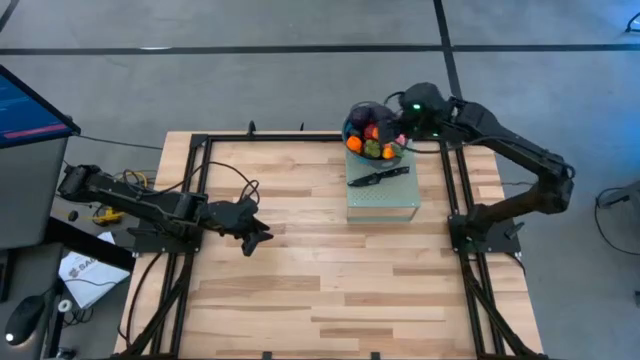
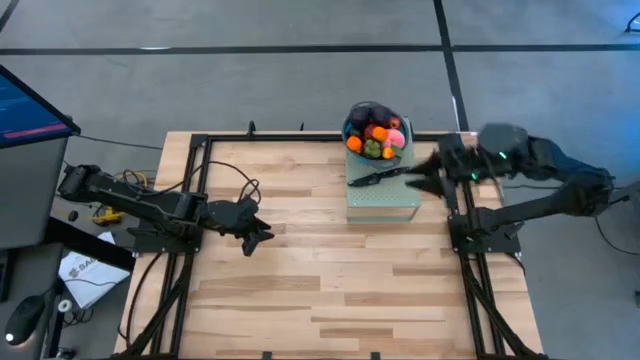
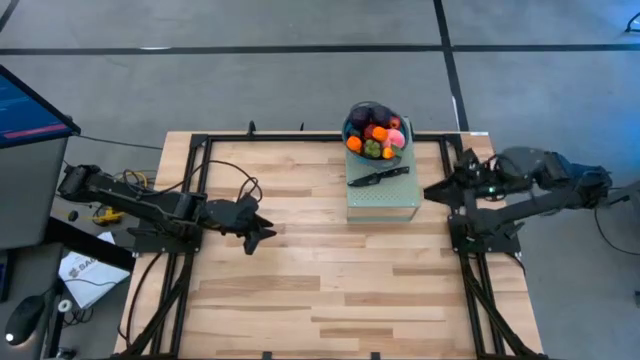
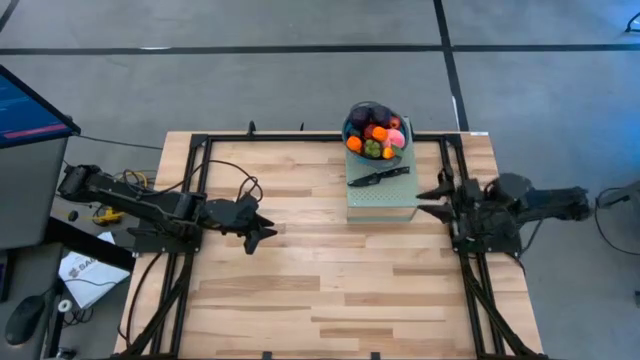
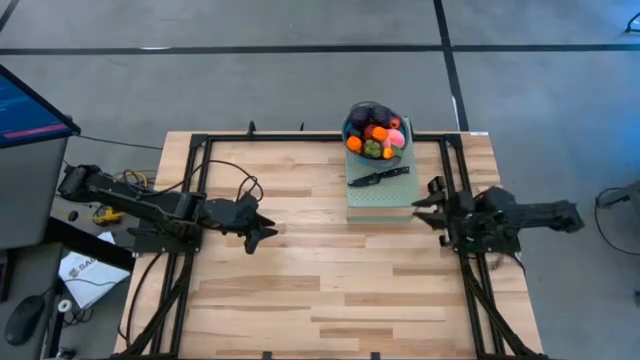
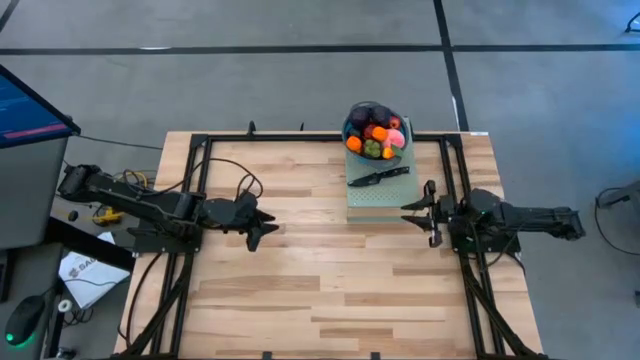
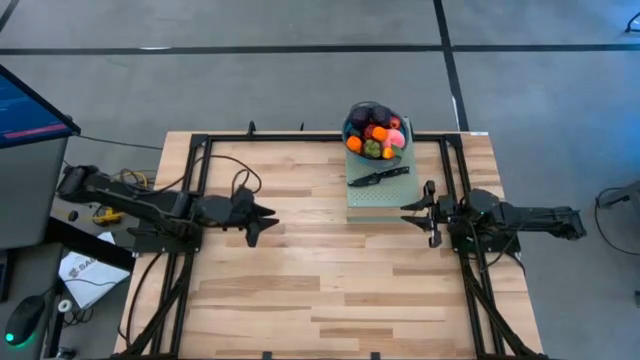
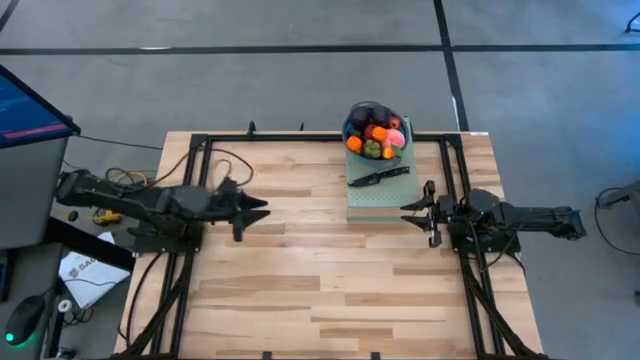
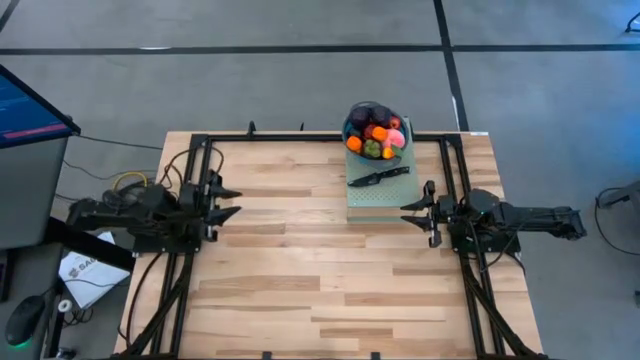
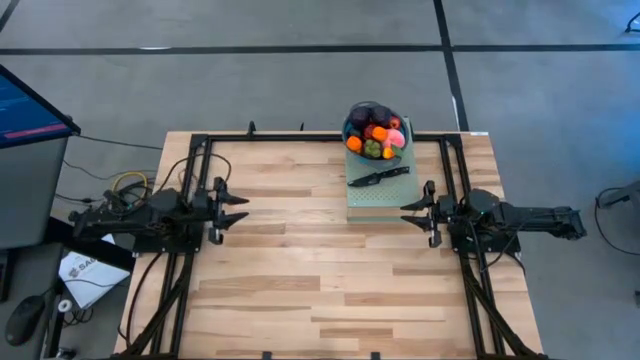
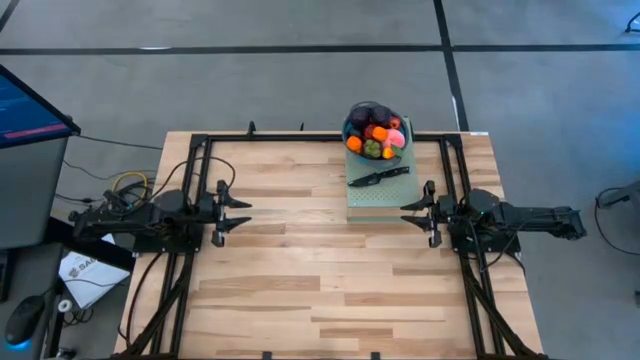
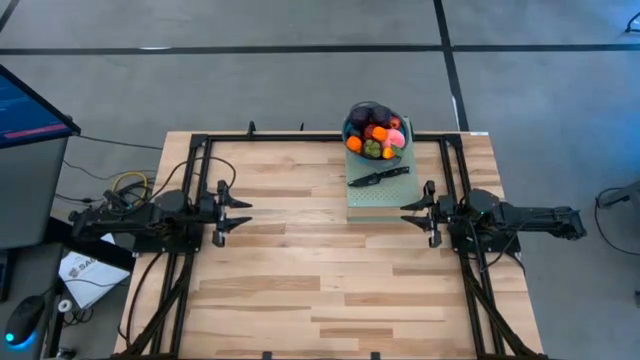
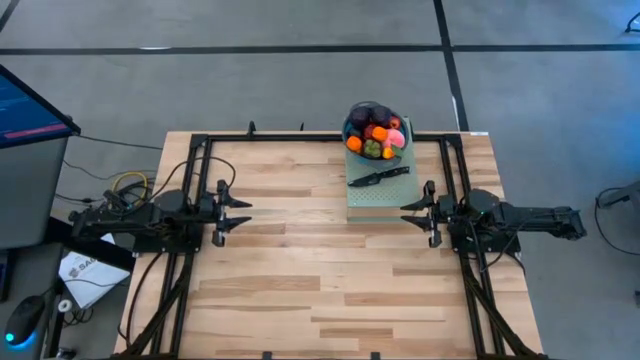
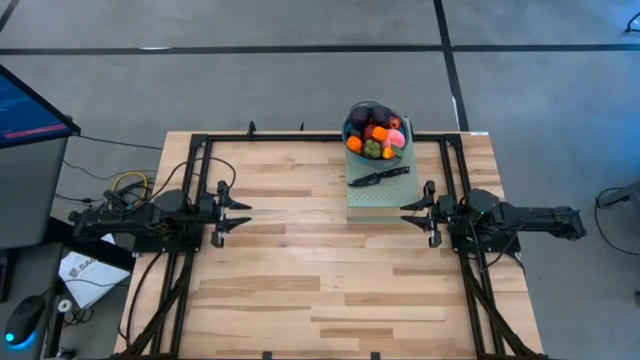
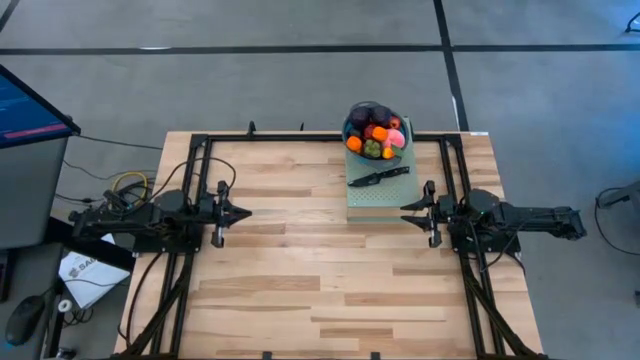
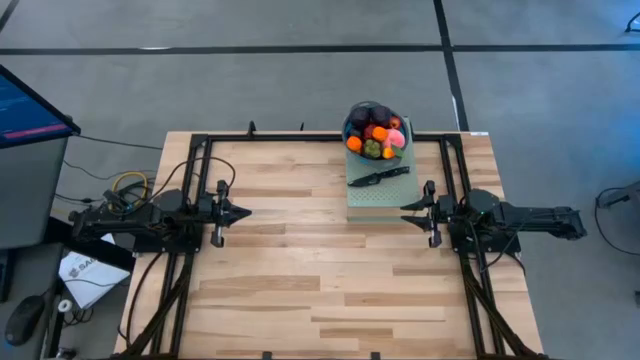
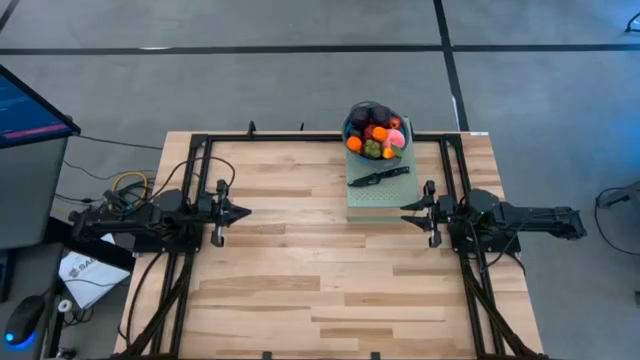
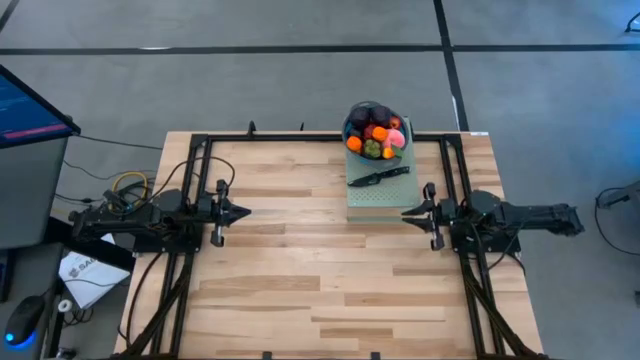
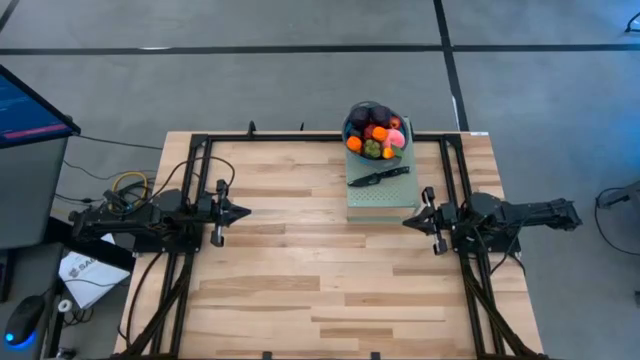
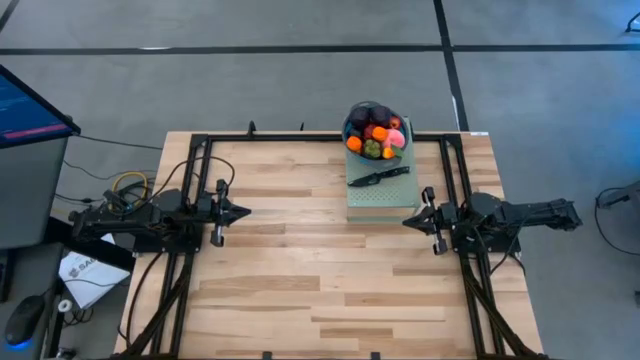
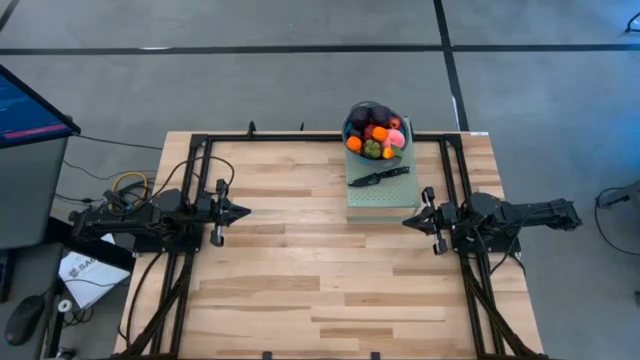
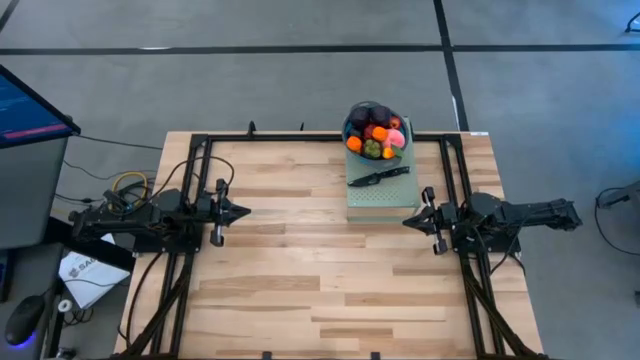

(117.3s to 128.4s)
Task: Pick & Place Fruit
Return to Home Position

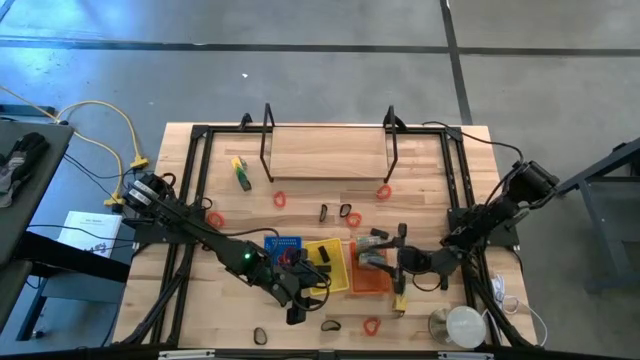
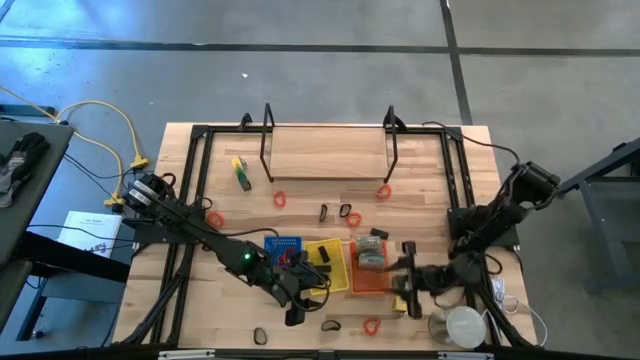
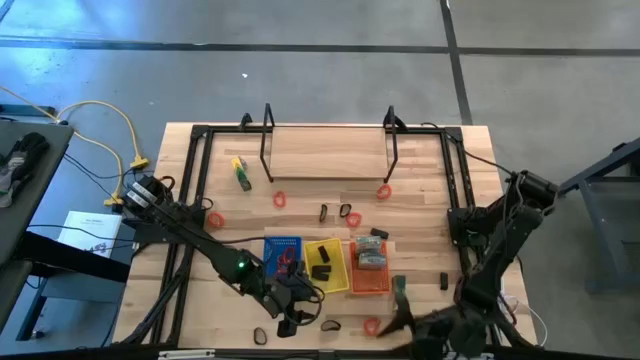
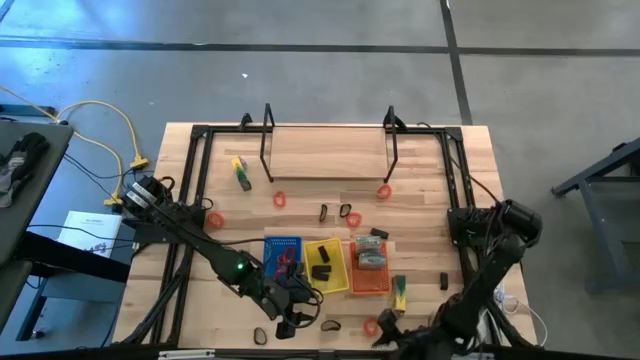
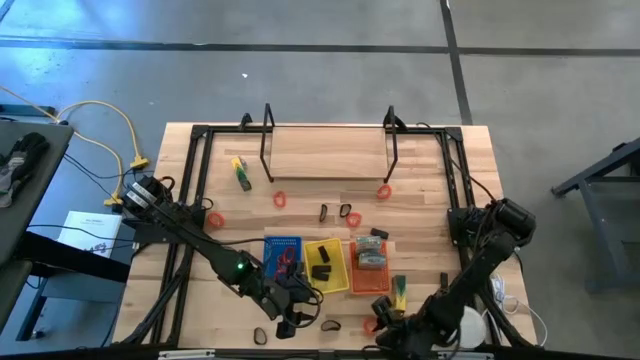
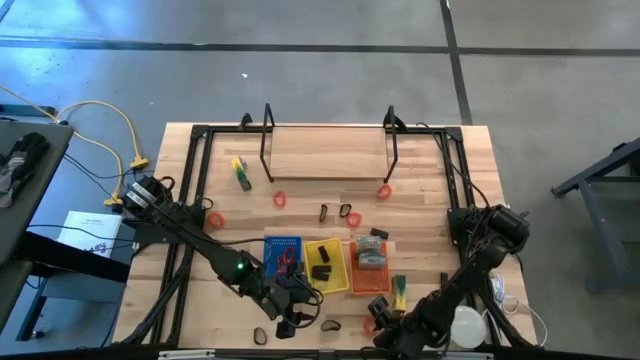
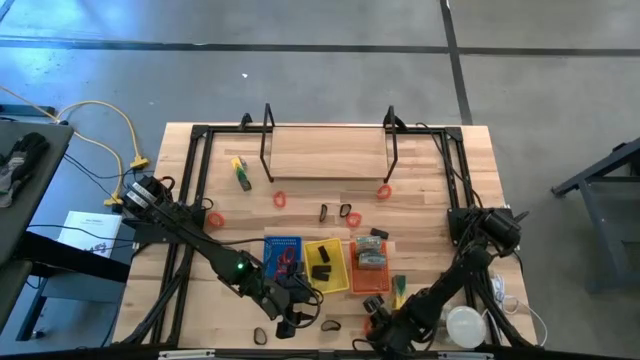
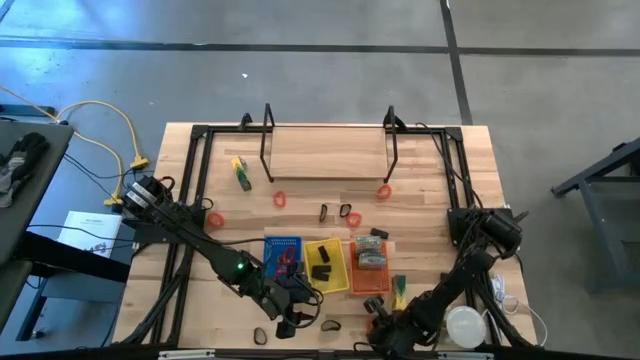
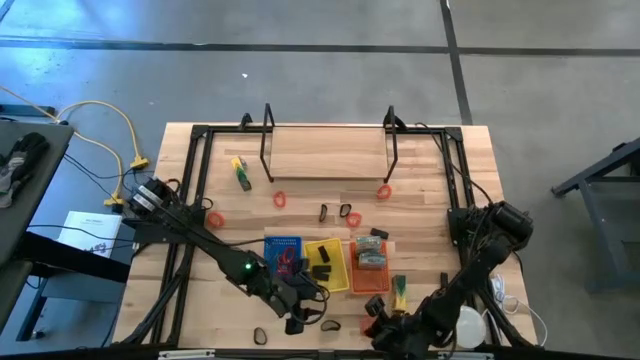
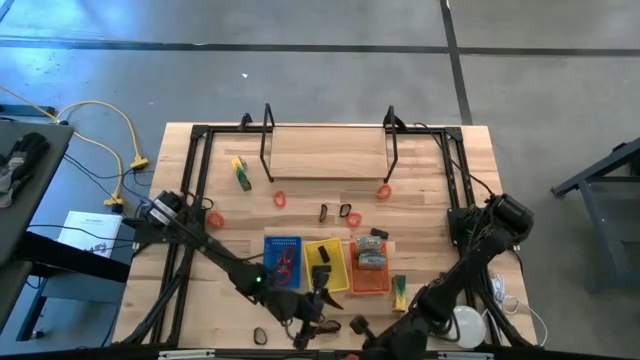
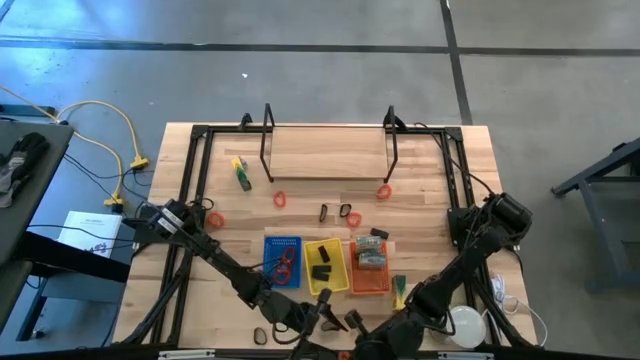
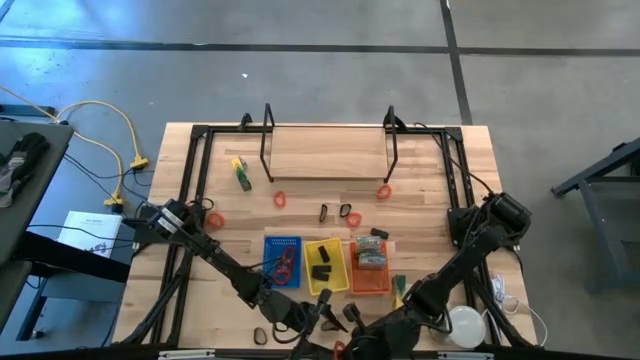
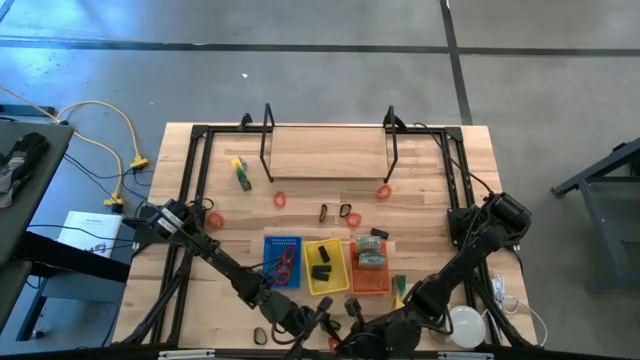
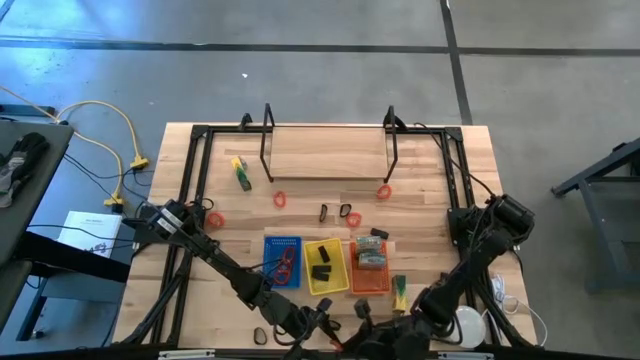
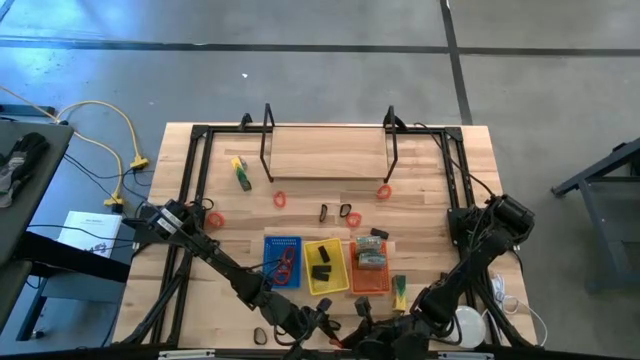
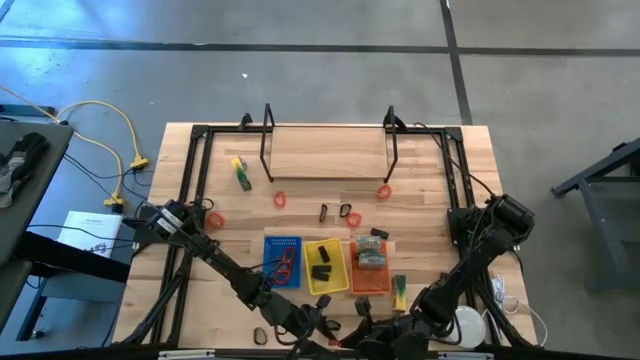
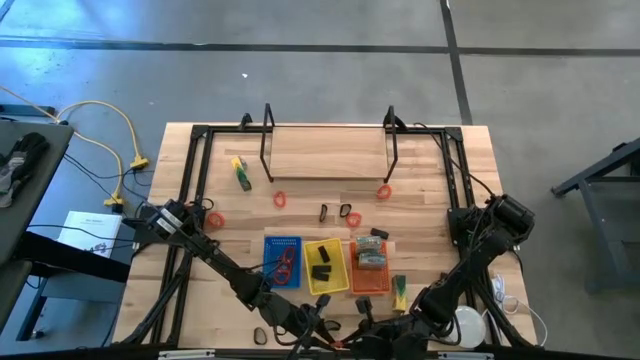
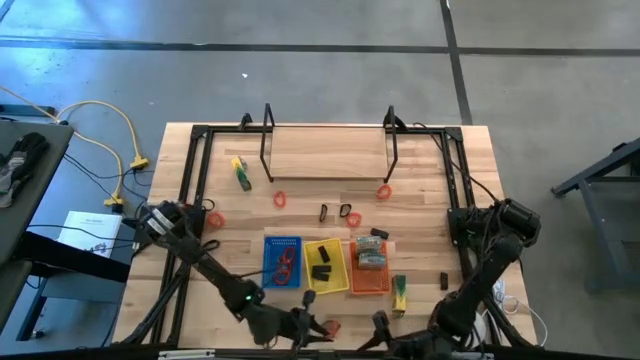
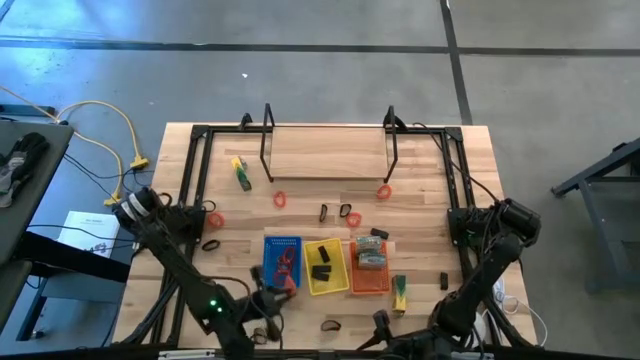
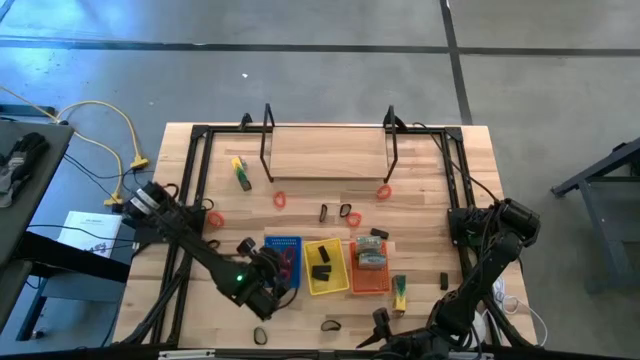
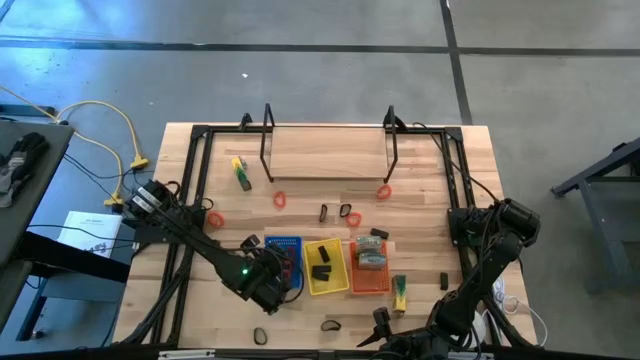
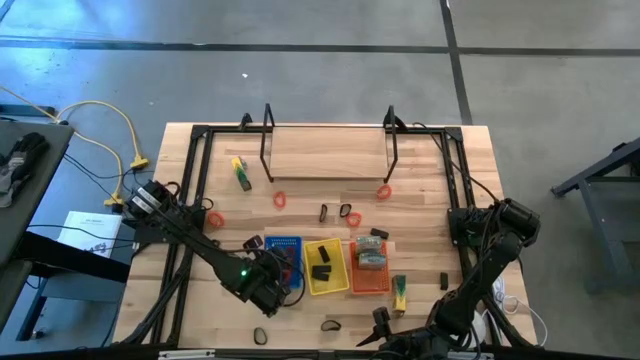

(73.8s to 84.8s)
Task: Pick & Place Office Desk Supplies
Put the orange spring keychain into the blue basket
